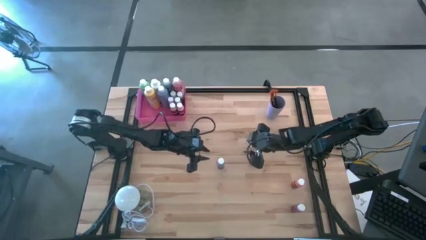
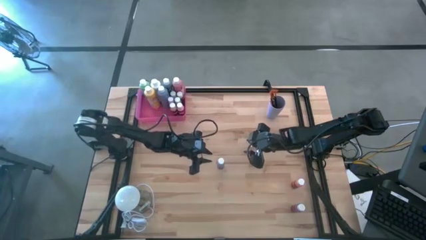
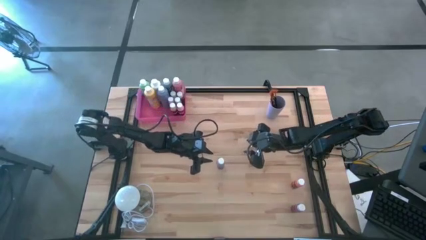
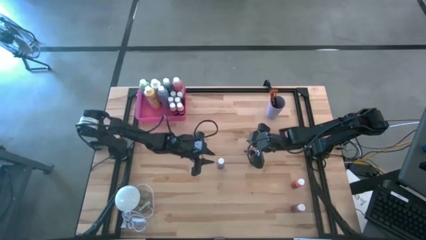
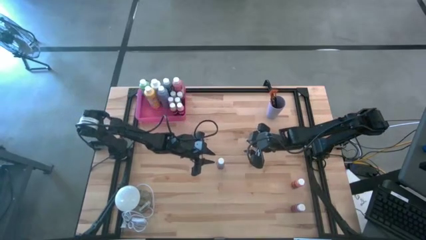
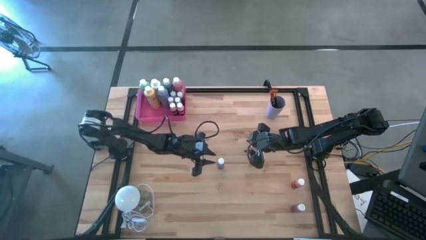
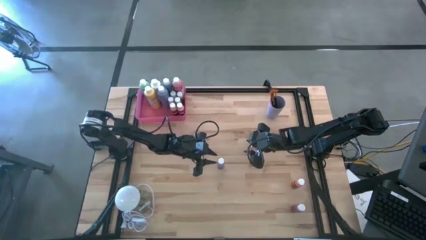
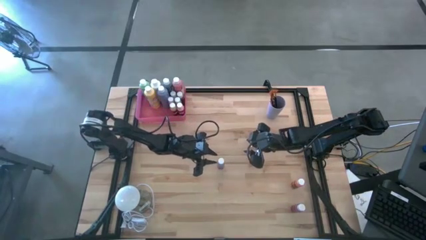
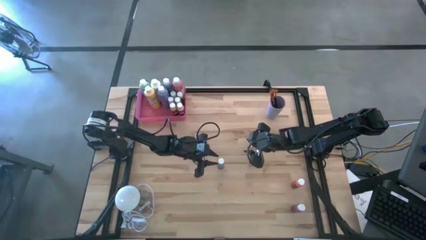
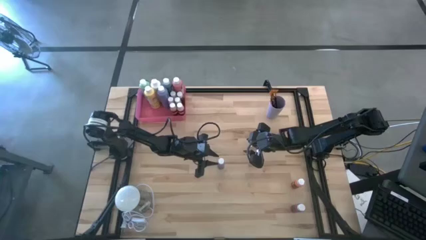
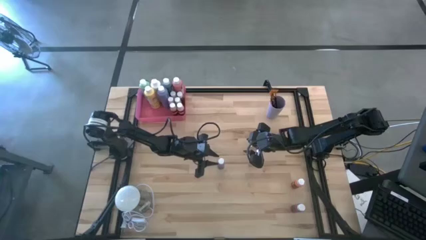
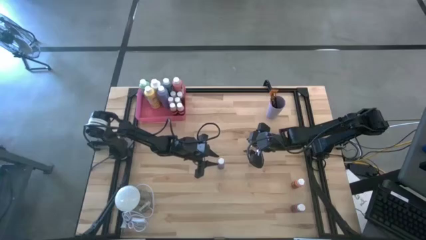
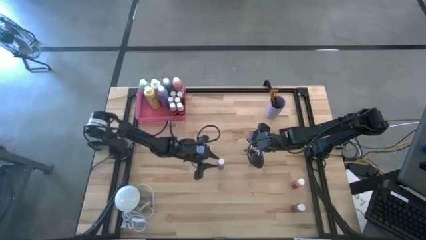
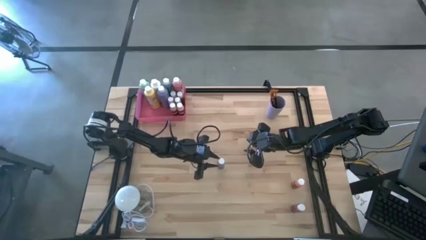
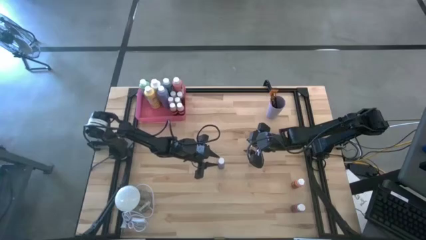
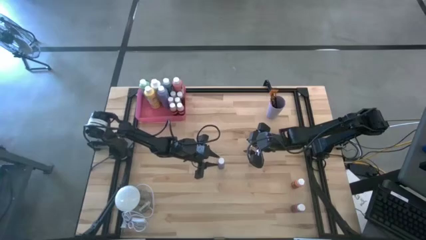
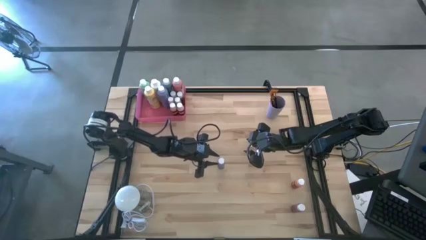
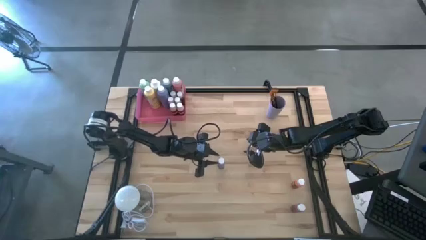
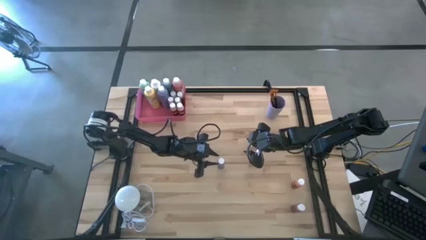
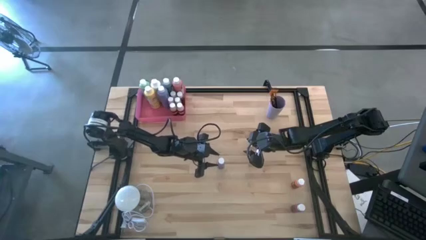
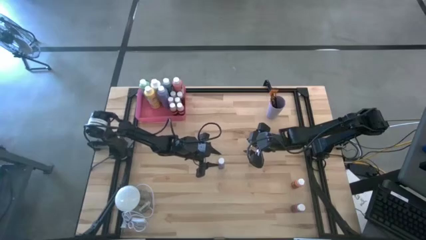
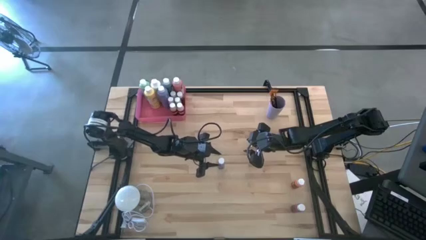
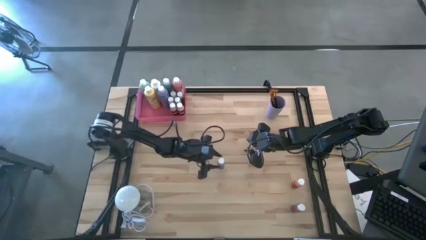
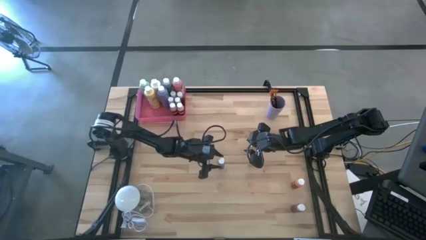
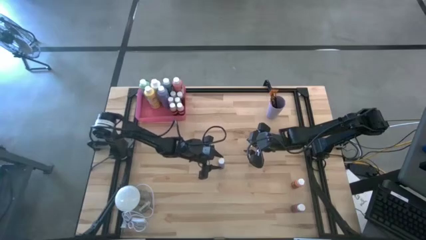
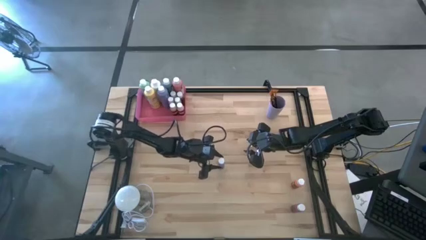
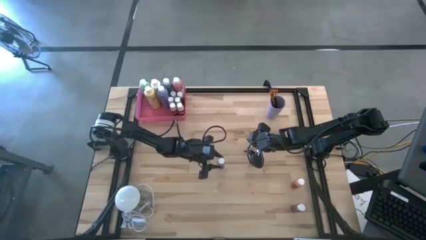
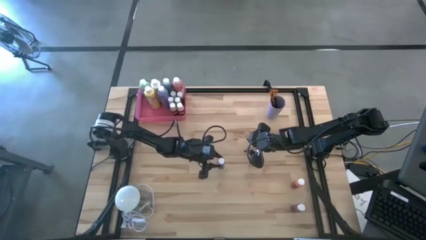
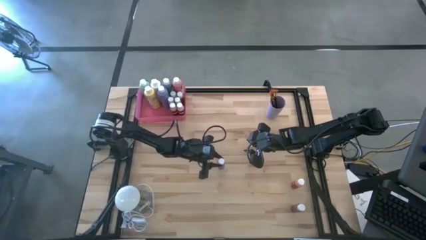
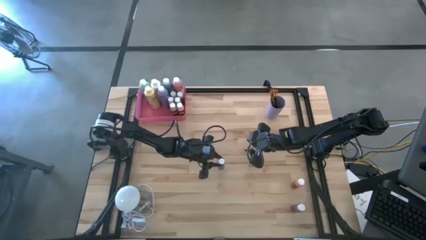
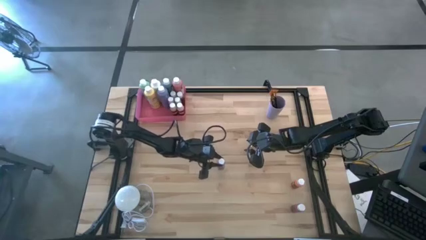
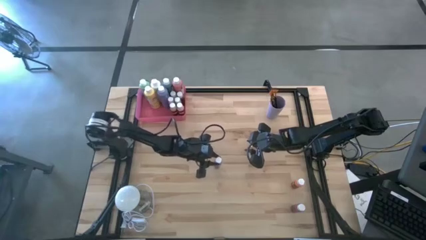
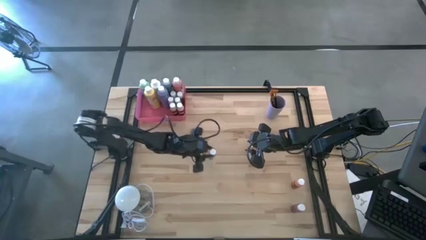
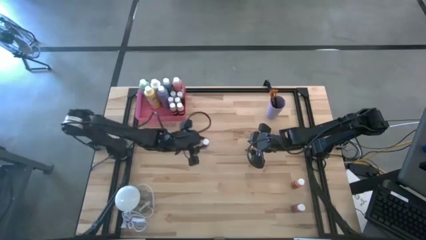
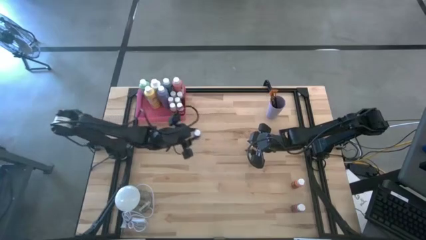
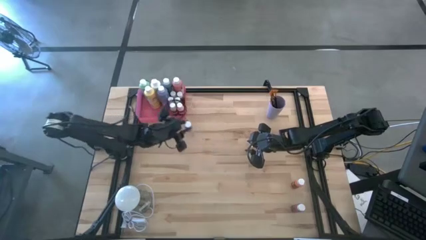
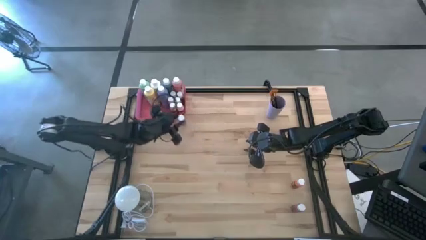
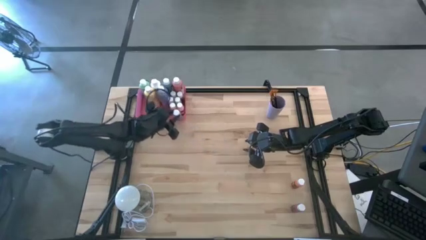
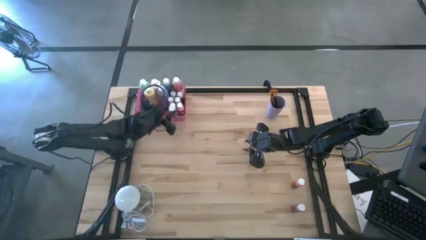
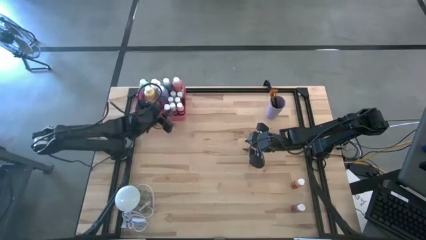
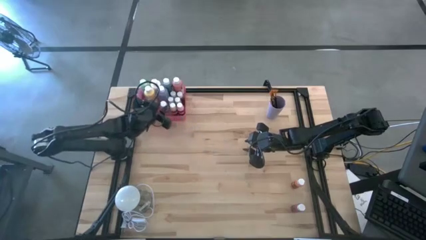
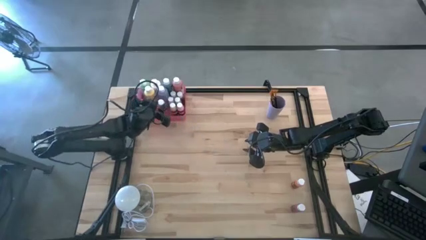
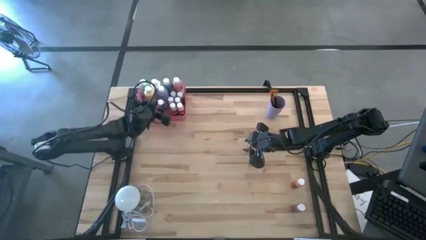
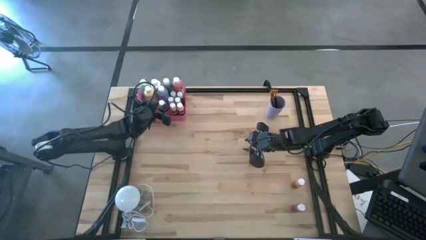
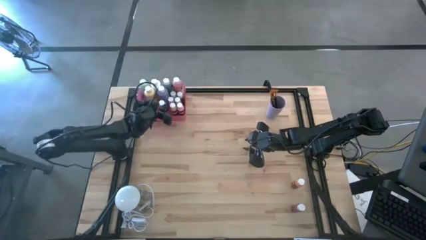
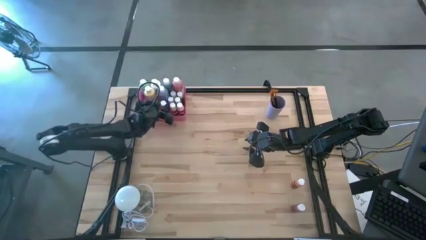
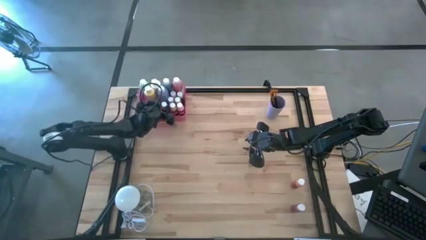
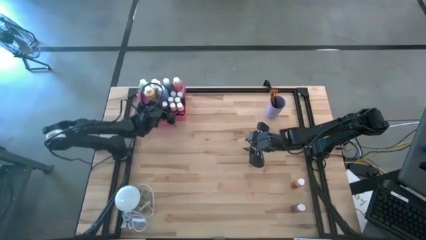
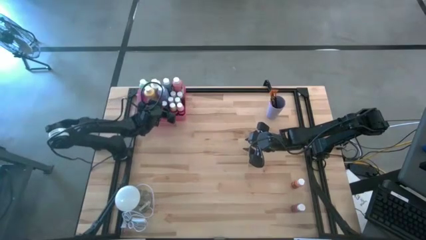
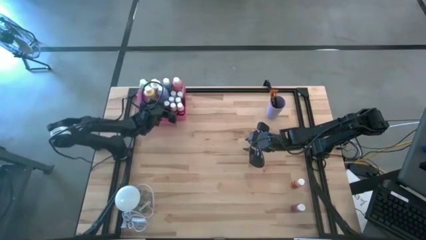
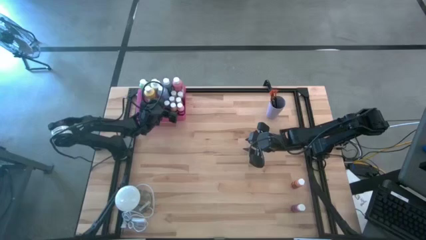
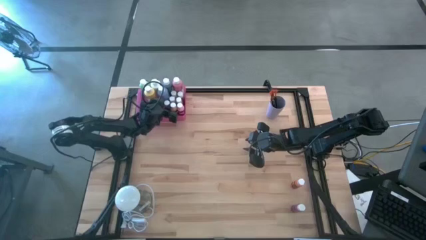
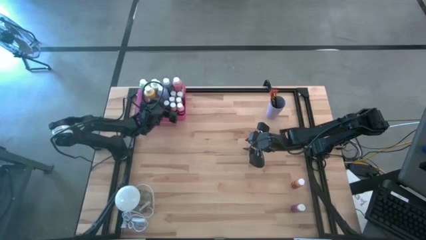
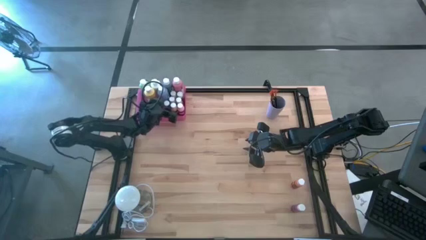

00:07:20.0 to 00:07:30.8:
Task: Pick & Place Paint Supplies
Put the small blue paint bottle into the pink bin
